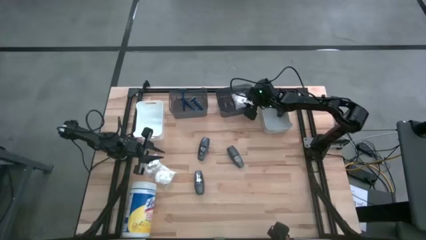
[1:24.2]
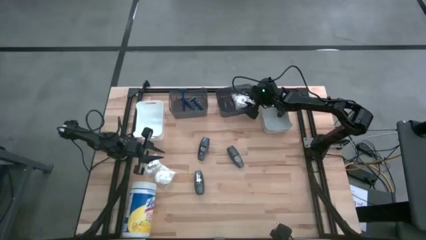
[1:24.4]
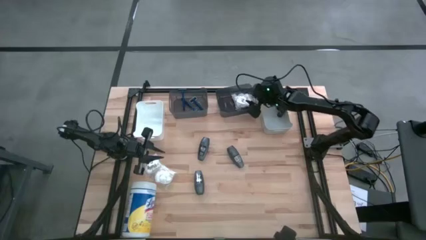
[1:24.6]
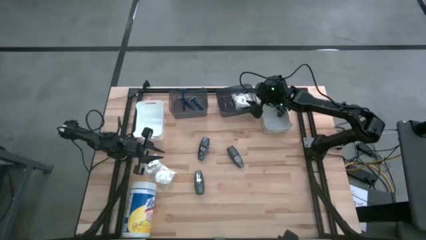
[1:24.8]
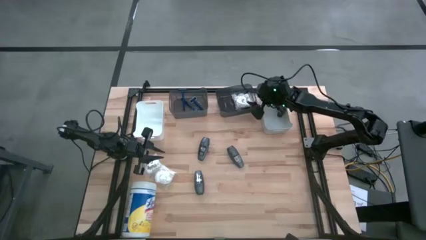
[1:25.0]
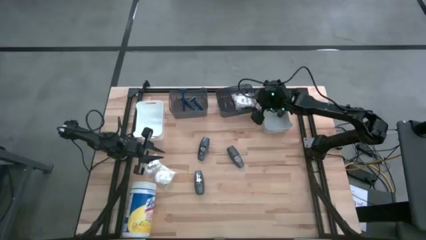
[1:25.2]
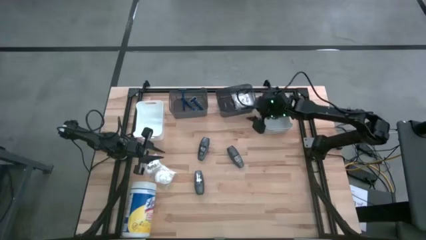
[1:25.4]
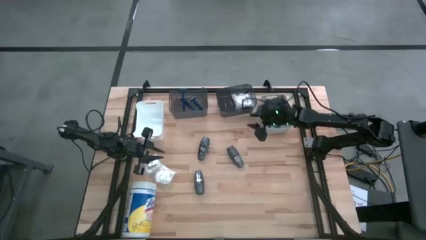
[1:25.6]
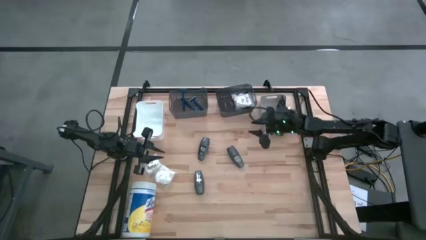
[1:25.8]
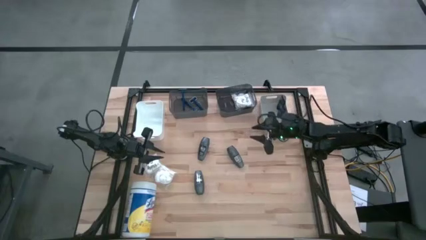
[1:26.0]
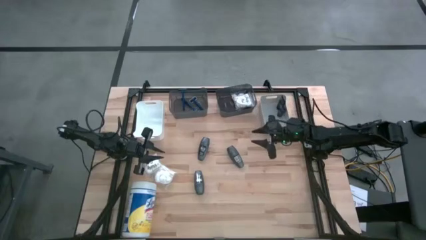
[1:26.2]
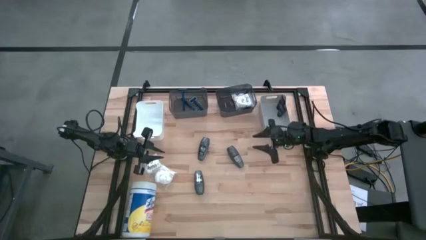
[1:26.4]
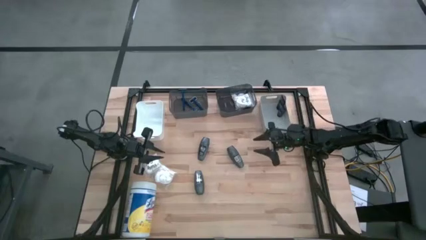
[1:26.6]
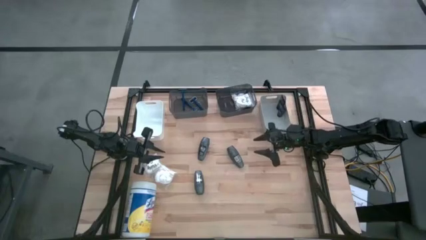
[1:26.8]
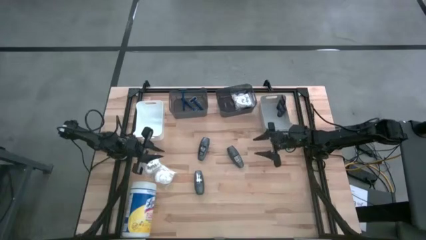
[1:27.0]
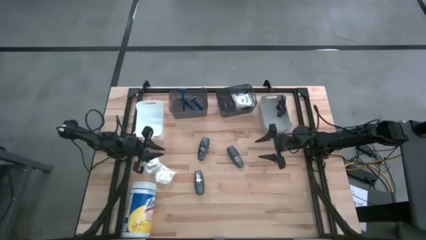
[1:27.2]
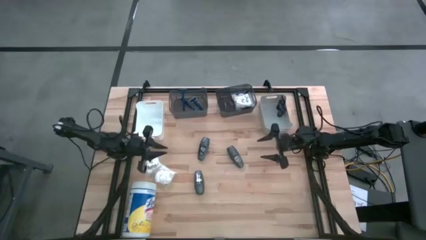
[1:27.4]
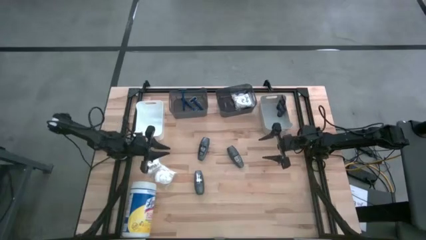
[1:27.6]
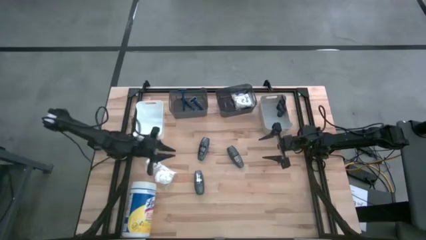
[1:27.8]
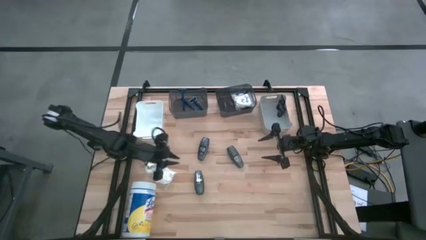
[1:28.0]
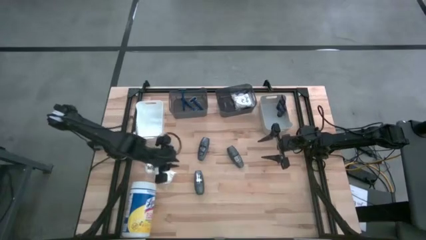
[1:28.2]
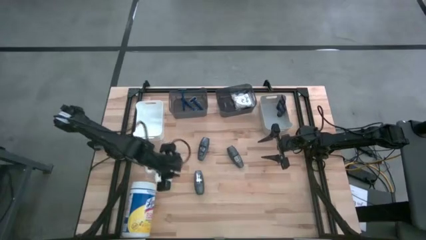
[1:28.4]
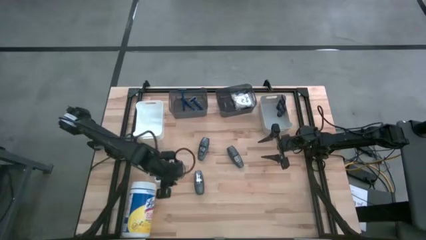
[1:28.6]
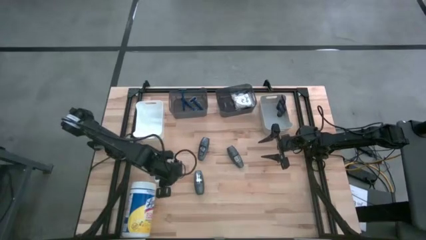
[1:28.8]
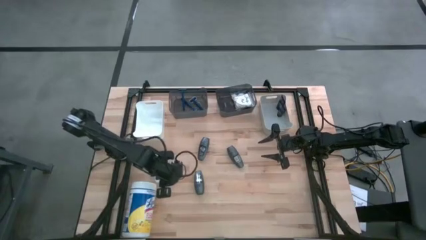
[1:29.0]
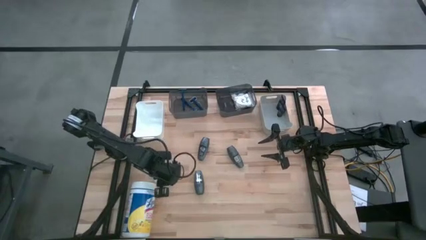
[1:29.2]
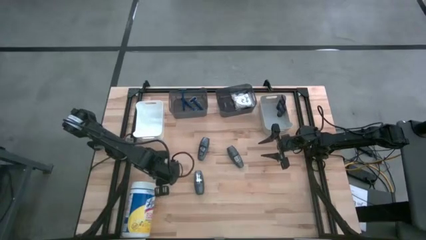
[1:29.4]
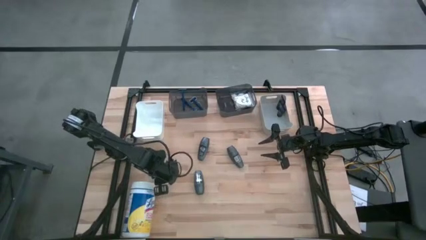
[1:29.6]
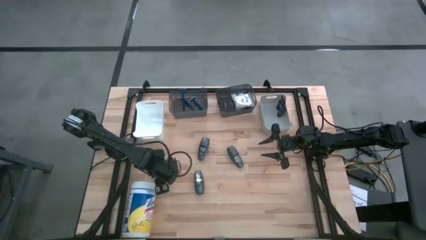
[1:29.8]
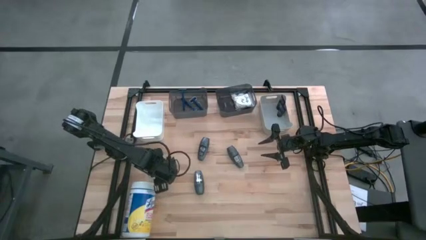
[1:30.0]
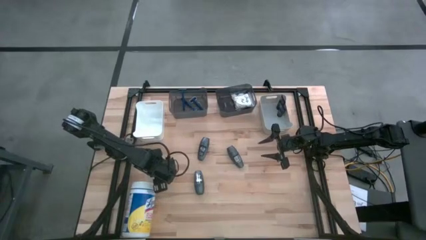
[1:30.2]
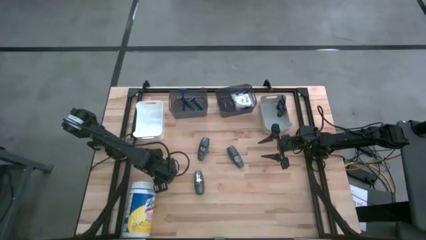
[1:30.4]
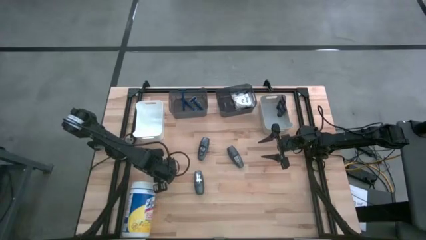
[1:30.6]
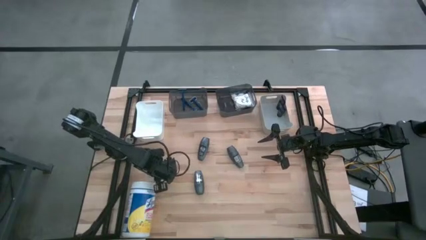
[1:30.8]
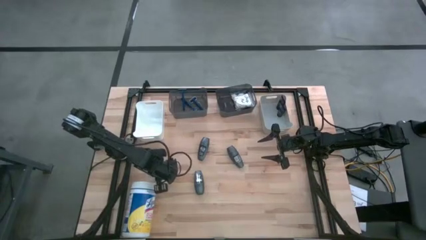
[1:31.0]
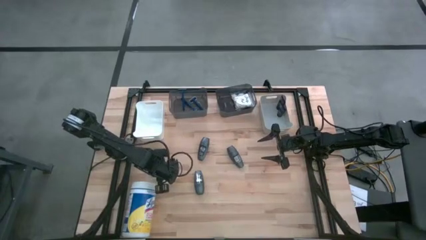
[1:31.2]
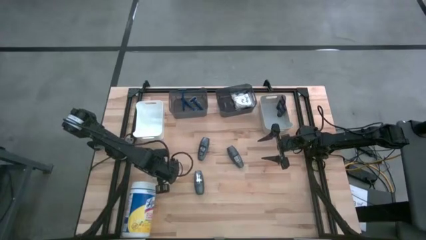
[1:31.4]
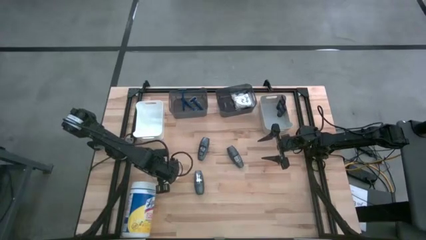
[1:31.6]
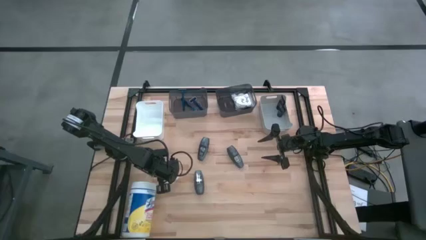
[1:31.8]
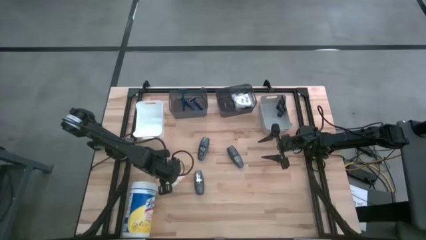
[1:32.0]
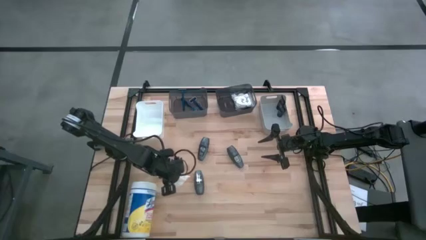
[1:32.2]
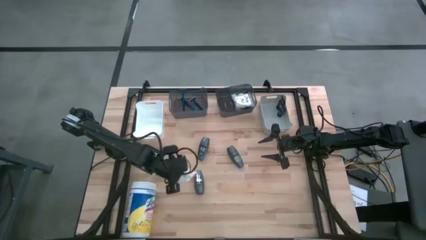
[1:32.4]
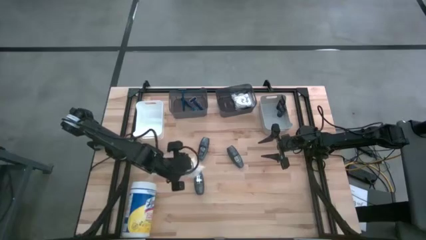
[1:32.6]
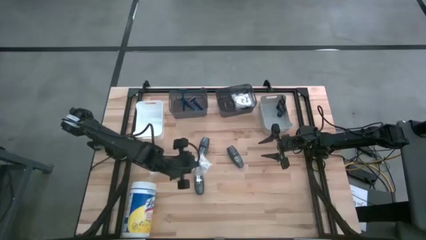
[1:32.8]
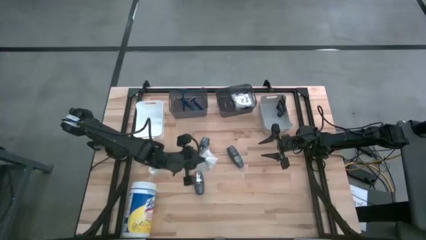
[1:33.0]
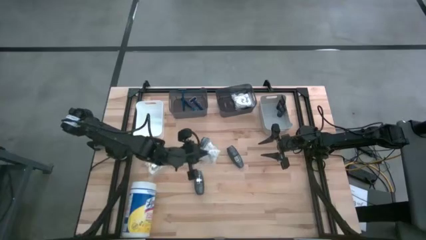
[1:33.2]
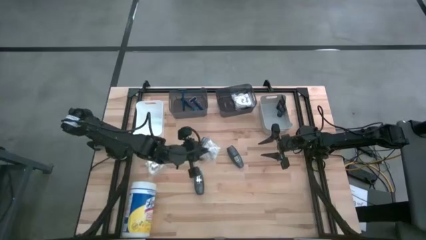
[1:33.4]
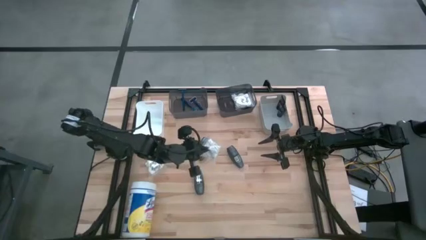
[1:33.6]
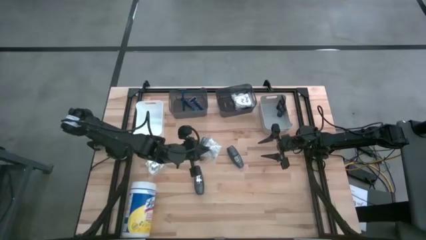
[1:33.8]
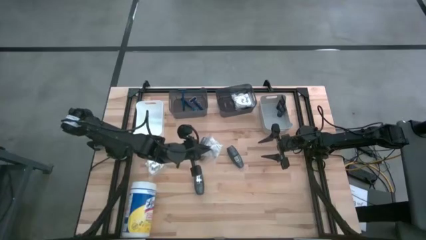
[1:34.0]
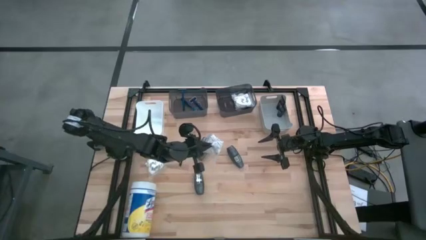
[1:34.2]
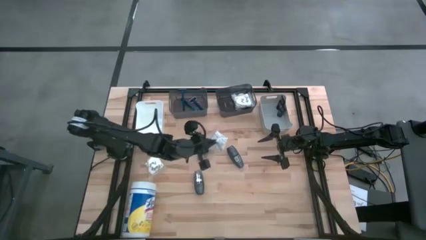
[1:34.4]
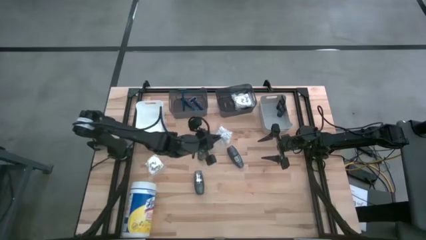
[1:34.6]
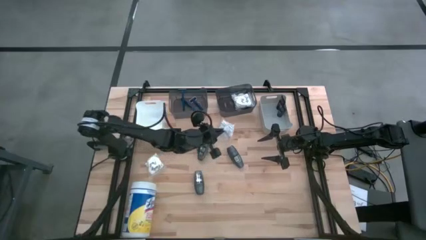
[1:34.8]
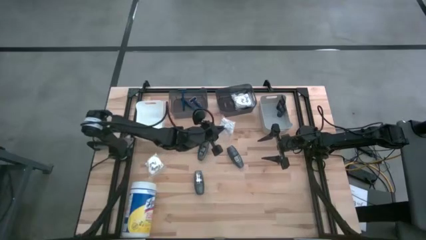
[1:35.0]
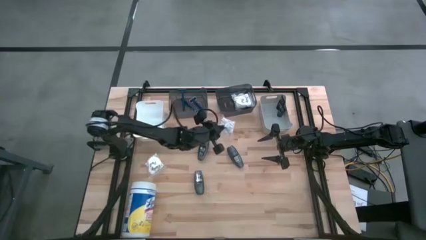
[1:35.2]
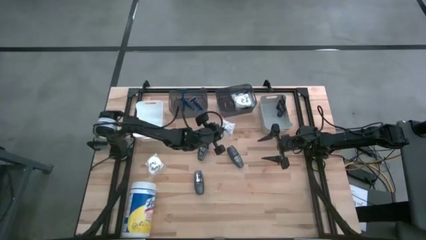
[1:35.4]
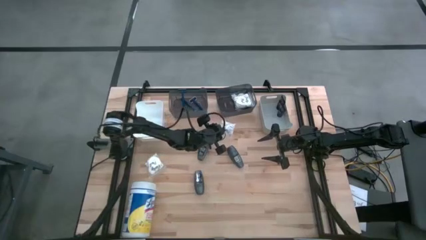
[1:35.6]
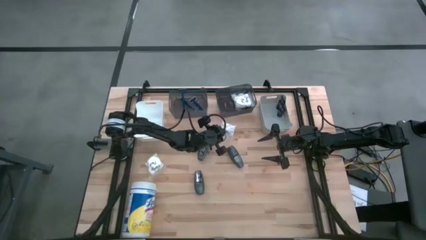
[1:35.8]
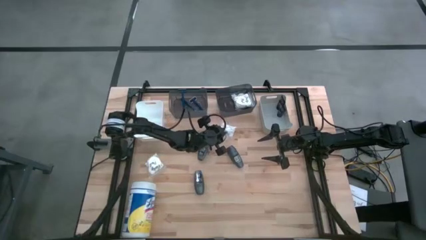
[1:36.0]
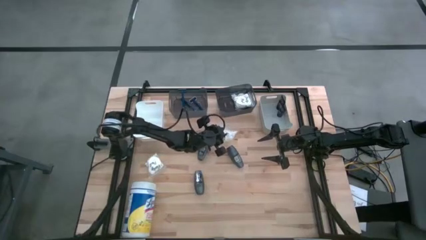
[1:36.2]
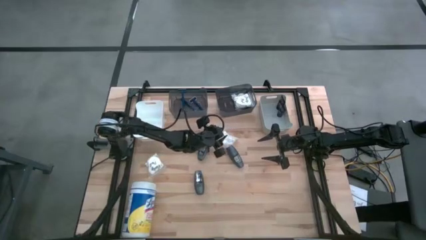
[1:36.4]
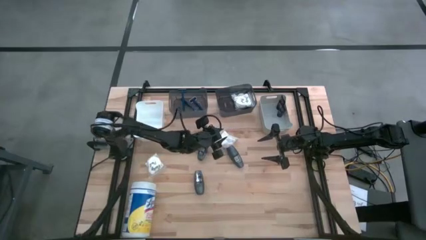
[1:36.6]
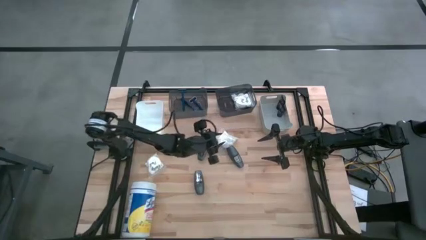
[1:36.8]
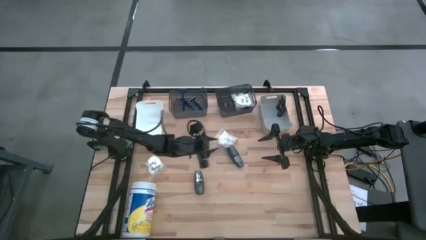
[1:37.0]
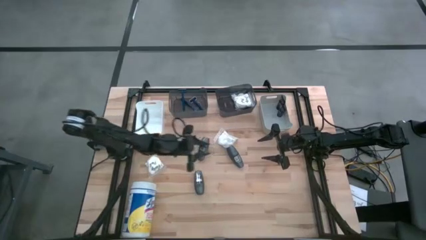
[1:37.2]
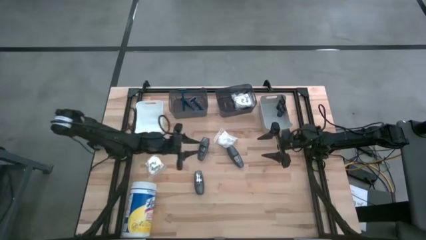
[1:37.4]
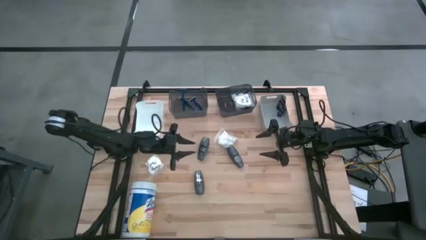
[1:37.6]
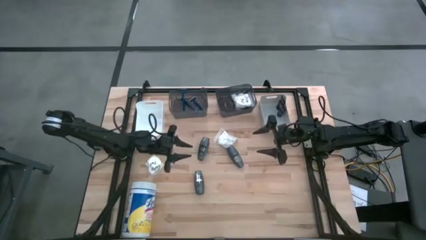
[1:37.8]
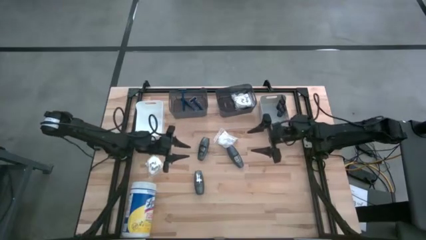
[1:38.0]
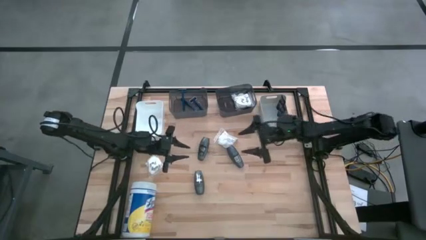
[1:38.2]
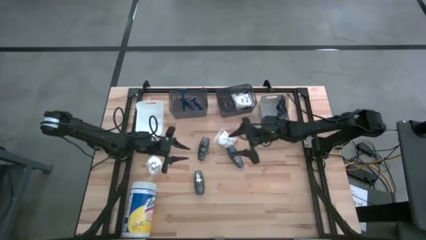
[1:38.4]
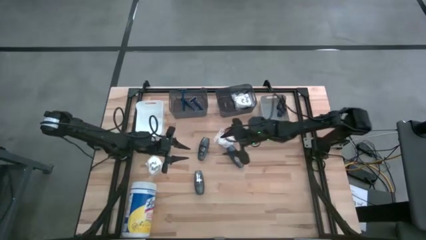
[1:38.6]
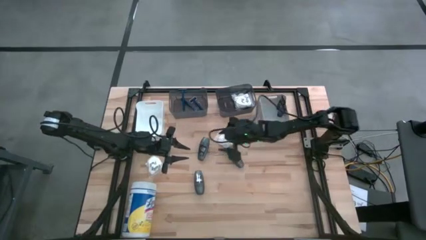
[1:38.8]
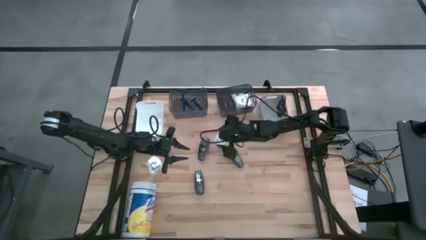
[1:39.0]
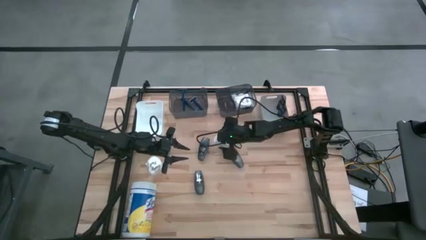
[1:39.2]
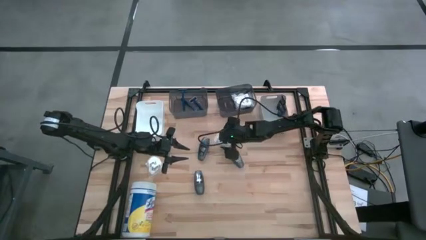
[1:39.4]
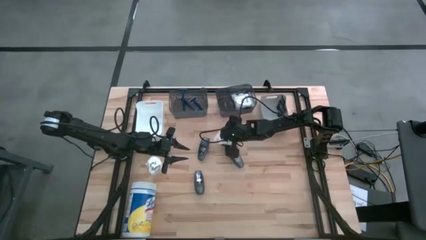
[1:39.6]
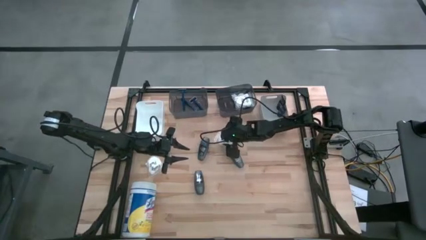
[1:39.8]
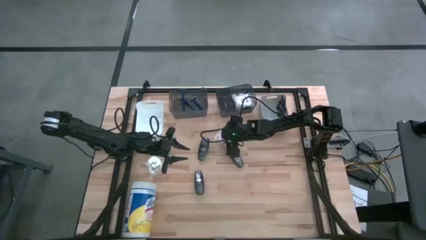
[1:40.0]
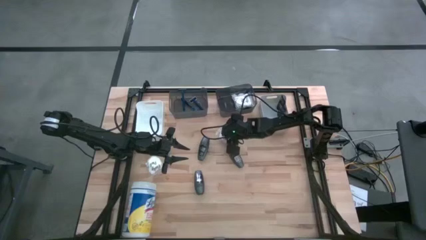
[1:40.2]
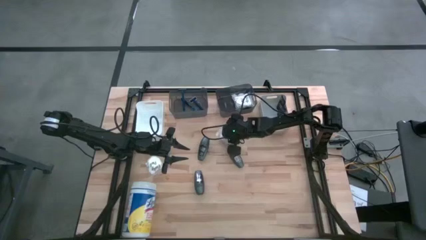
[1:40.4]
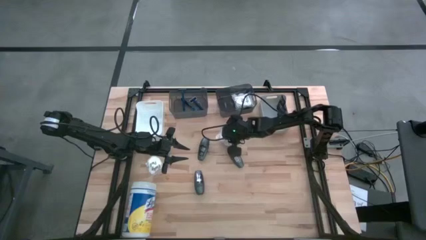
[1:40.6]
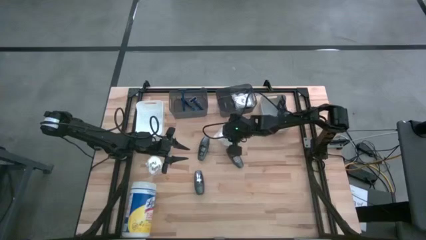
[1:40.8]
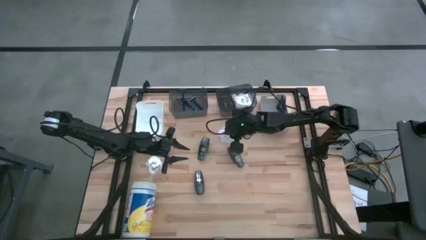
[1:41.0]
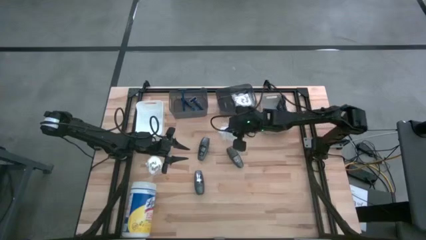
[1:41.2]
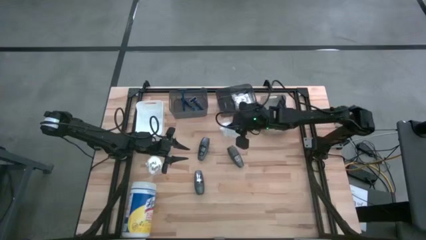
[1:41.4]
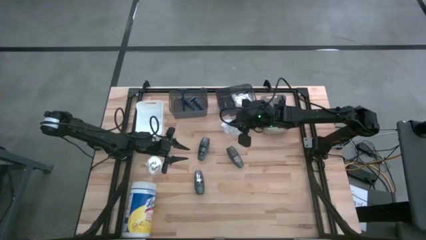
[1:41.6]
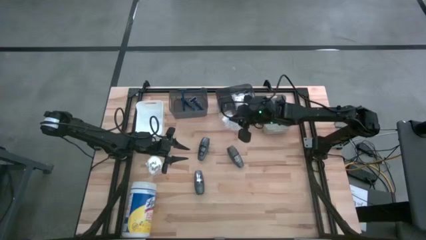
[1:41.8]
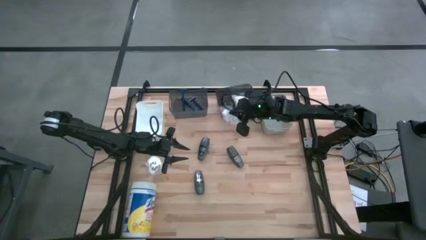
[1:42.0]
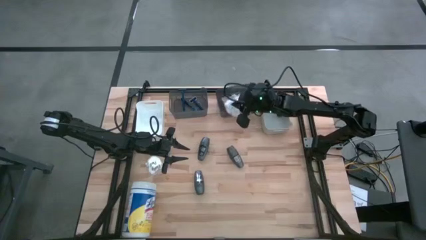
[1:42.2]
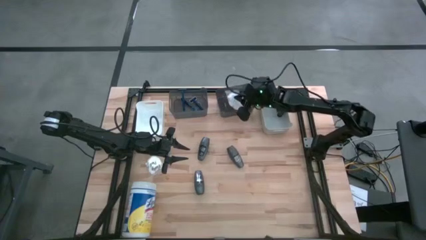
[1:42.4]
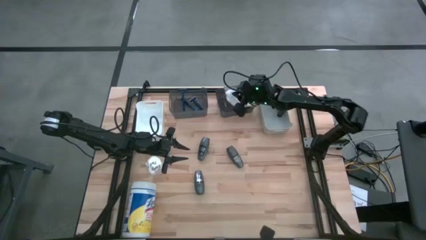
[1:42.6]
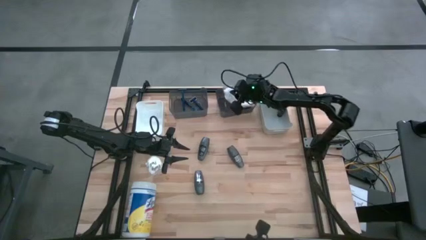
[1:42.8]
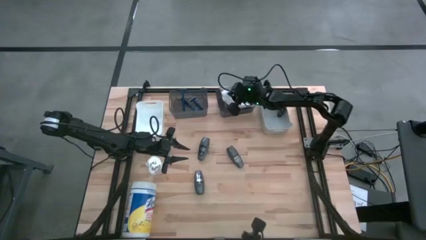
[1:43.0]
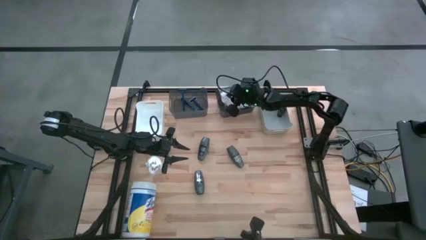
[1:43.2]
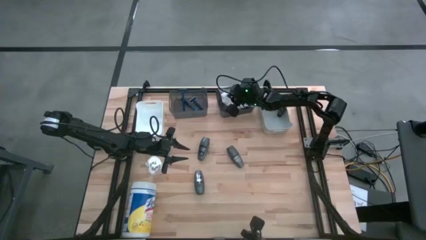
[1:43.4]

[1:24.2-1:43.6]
Task: Pick & Place Travel size toiletries
Put the white cotton pack into the right black bin
